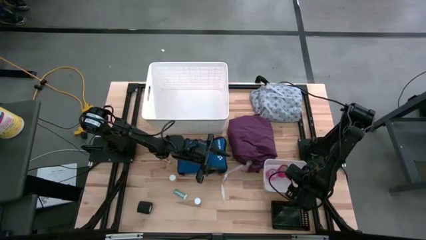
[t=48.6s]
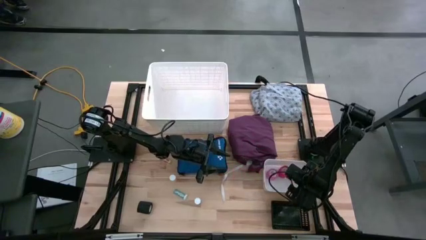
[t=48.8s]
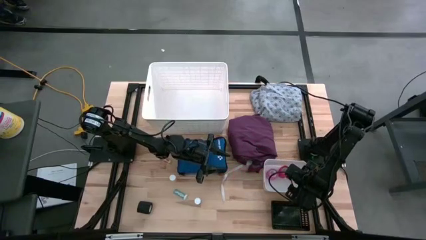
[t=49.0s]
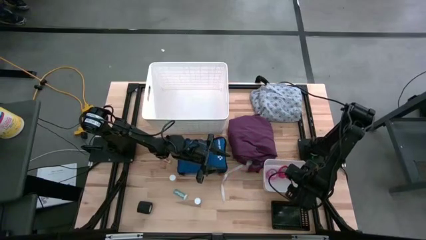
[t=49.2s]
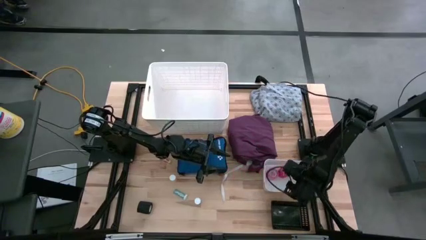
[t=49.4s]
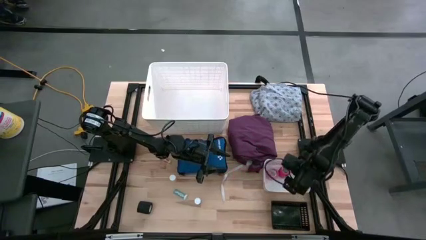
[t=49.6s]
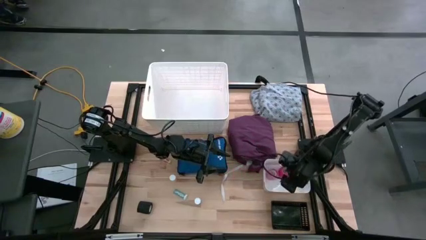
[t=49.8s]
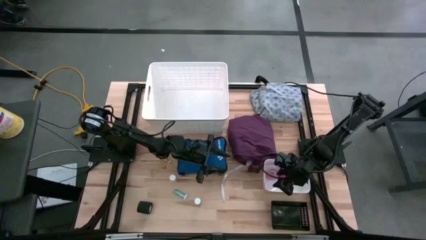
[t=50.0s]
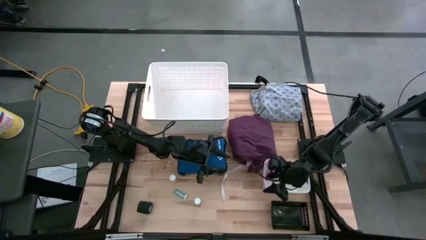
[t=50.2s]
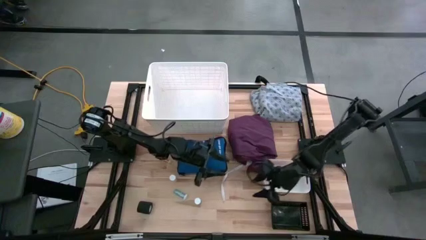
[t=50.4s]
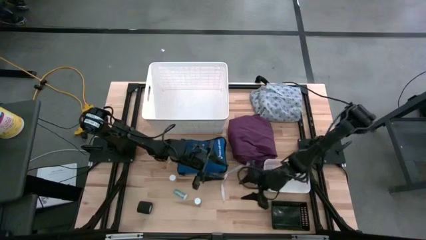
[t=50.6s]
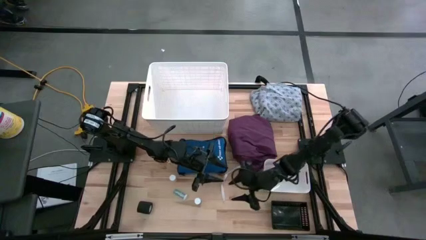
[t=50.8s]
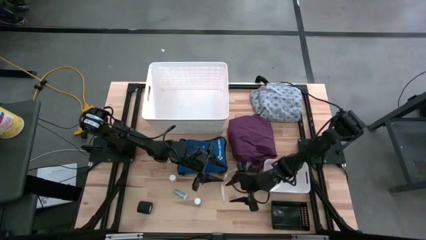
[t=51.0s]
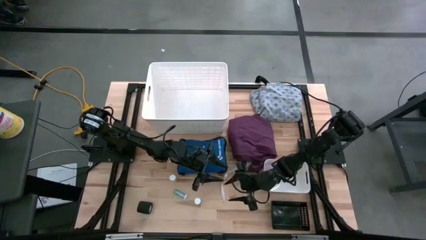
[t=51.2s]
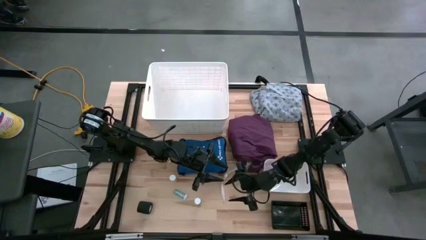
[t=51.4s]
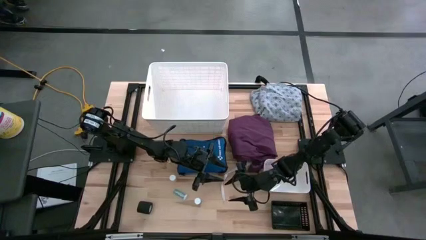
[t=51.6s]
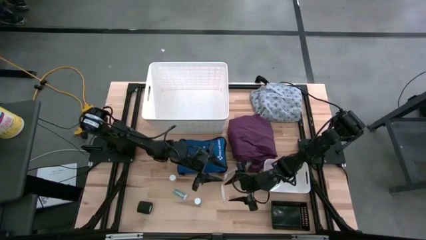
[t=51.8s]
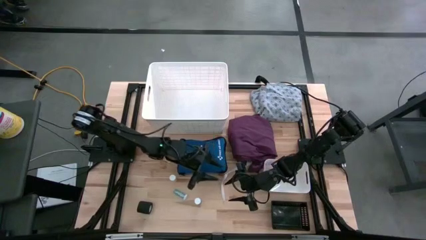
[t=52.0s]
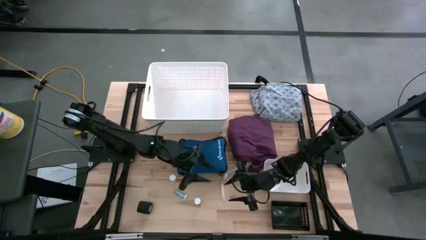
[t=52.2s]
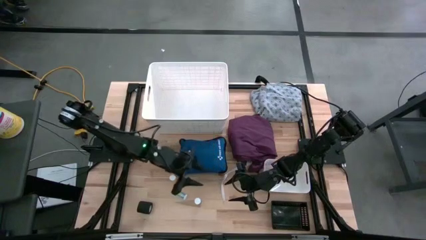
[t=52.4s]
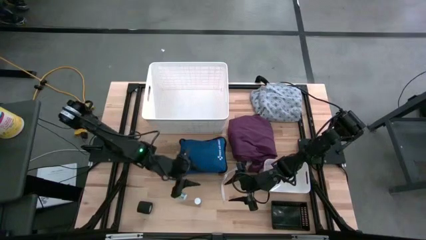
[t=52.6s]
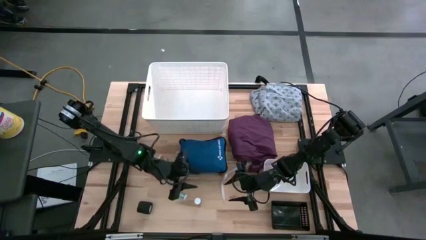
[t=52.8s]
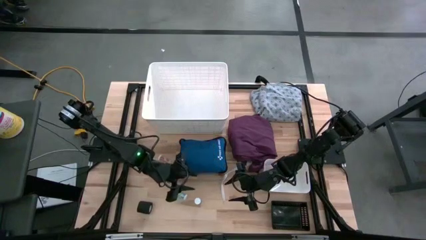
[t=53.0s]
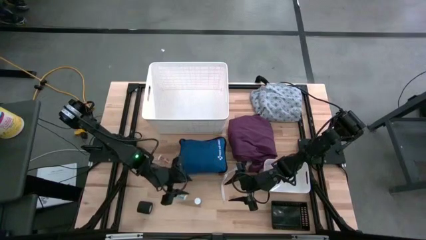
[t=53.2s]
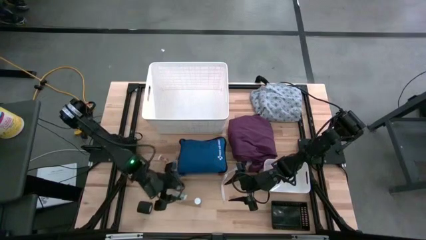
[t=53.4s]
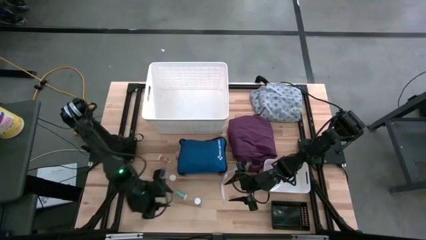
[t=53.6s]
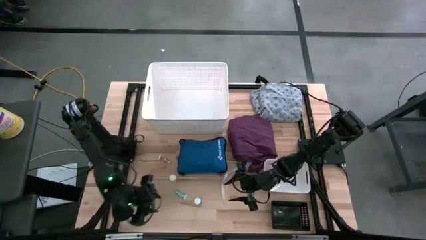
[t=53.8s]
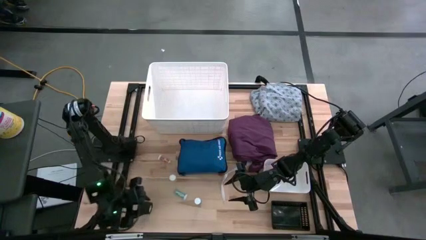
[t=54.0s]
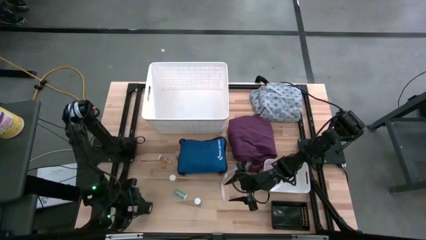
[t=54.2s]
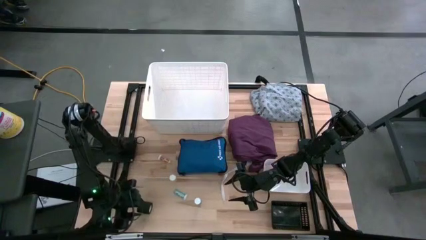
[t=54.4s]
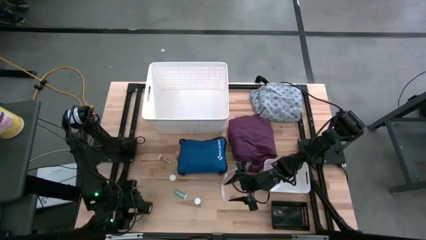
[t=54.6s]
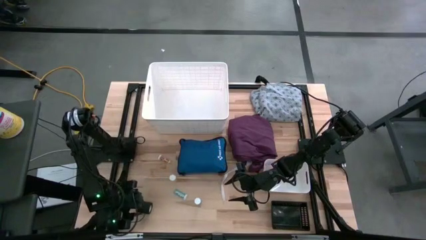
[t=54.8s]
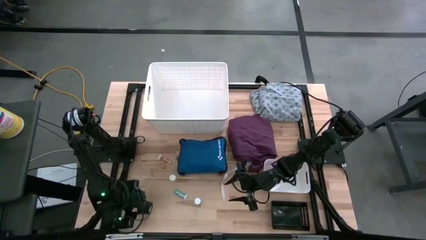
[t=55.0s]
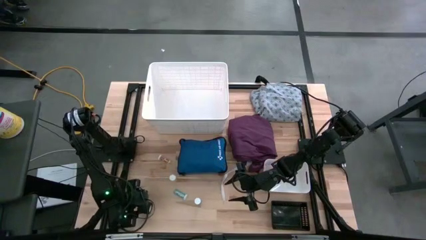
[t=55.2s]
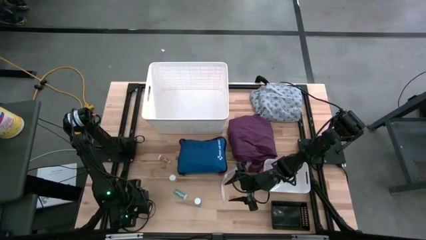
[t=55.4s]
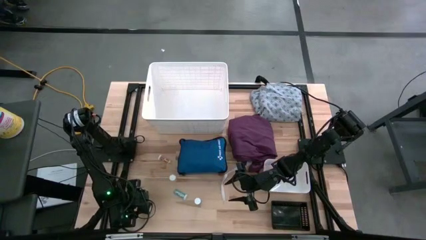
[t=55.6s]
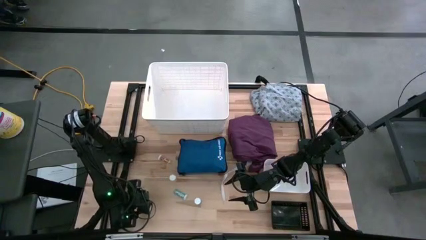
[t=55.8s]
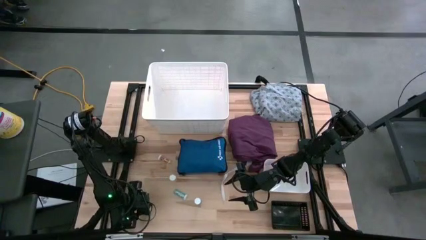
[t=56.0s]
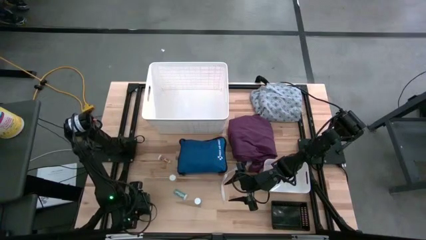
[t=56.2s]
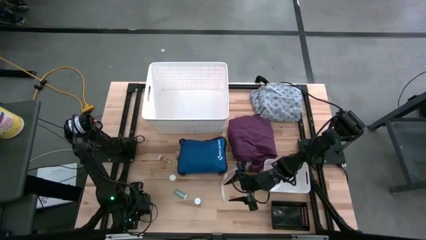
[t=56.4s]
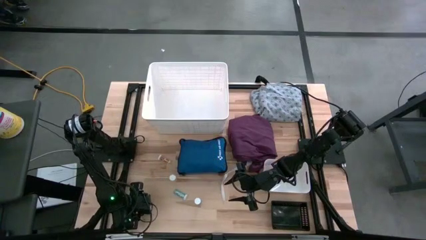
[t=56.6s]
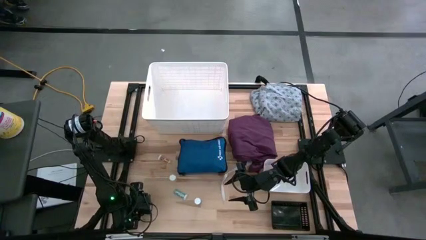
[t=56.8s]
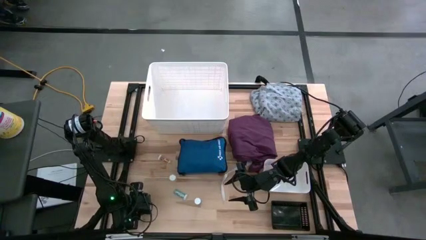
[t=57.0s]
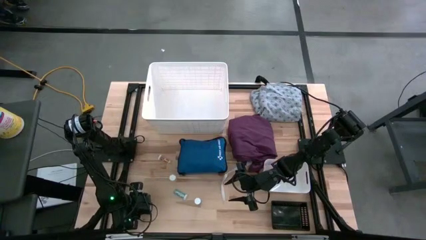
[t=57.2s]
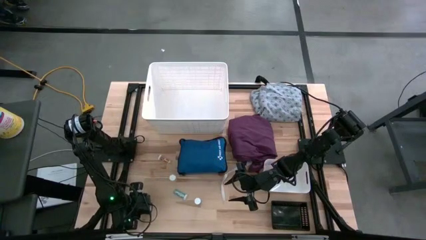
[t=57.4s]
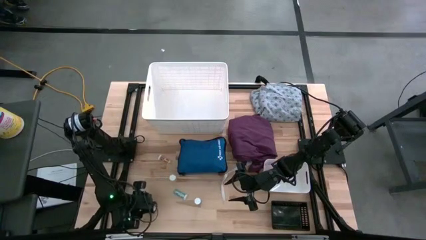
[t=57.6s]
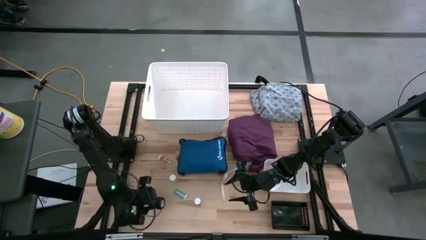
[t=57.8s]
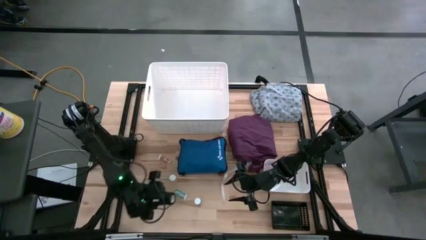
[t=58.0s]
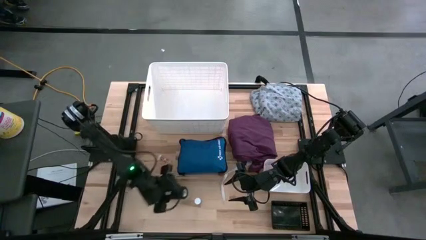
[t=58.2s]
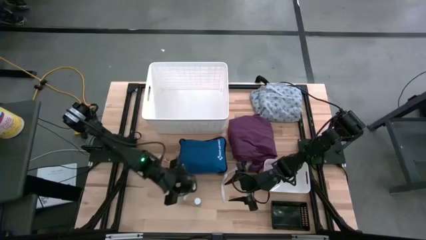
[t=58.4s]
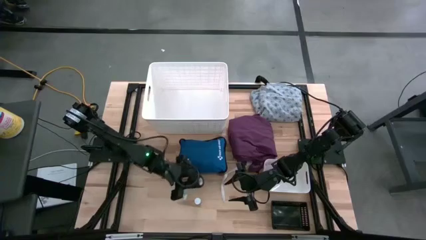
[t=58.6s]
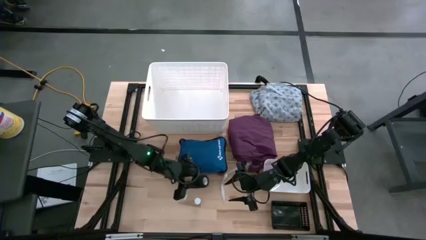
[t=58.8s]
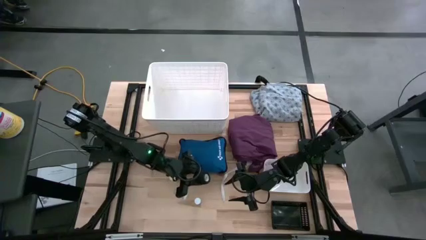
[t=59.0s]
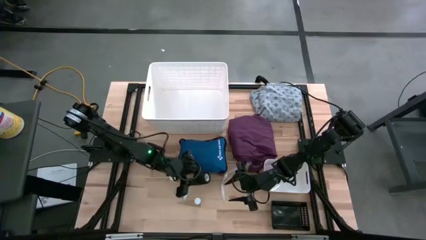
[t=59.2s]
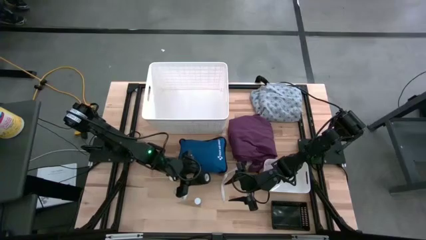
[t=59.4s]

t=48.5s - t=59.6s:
Task: Pick & Place Medicine items
Put the black bandage into the white bin

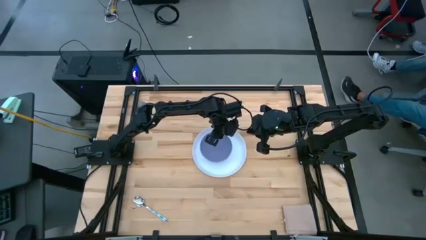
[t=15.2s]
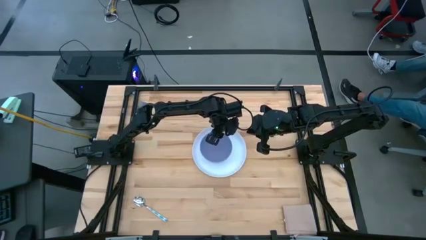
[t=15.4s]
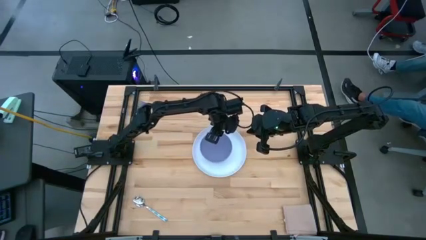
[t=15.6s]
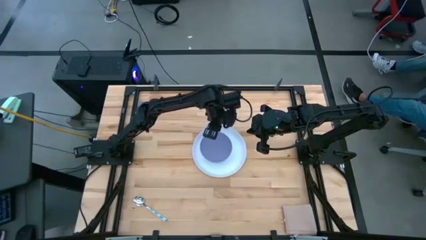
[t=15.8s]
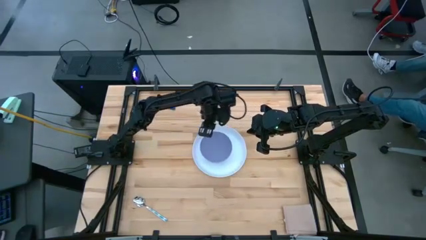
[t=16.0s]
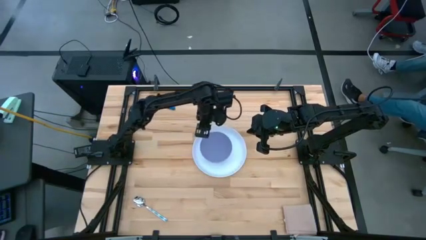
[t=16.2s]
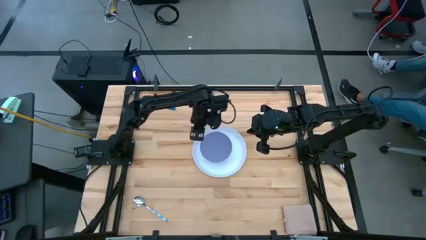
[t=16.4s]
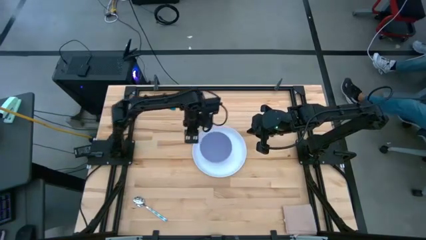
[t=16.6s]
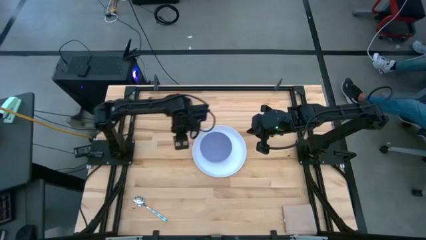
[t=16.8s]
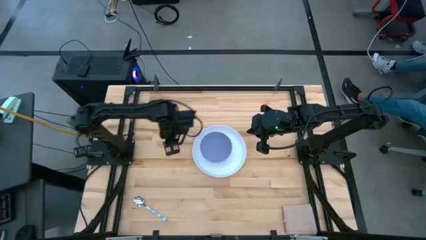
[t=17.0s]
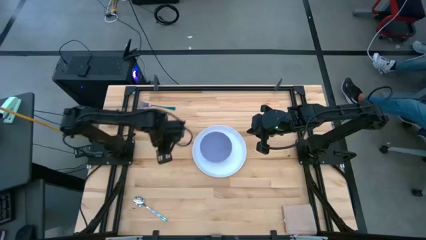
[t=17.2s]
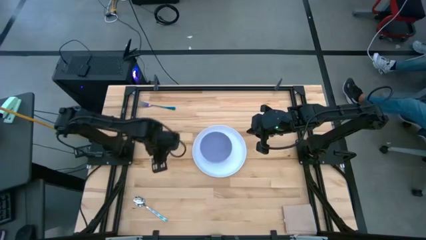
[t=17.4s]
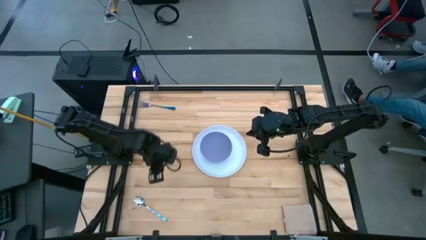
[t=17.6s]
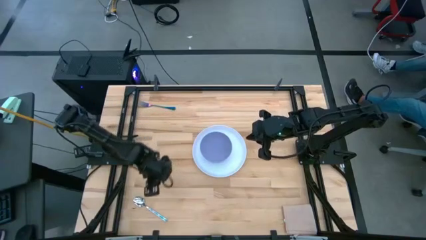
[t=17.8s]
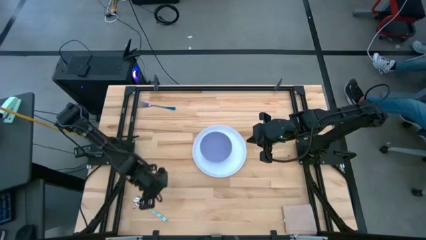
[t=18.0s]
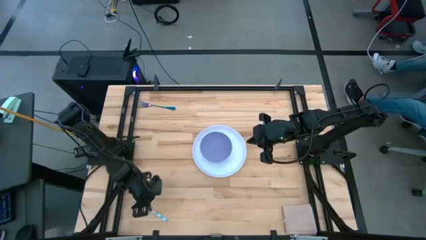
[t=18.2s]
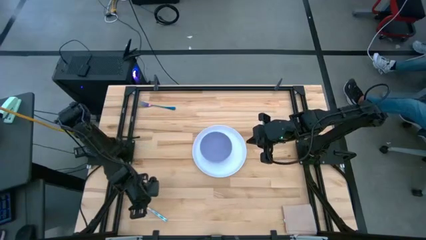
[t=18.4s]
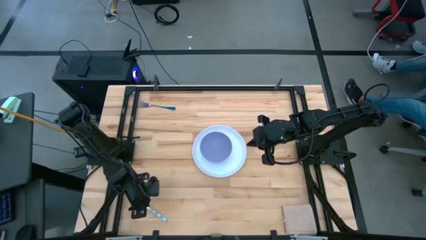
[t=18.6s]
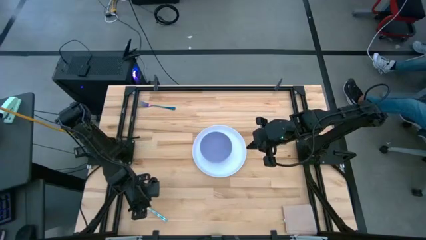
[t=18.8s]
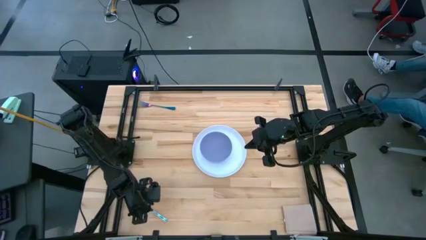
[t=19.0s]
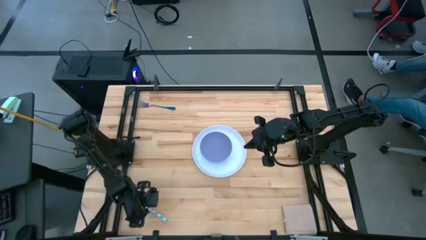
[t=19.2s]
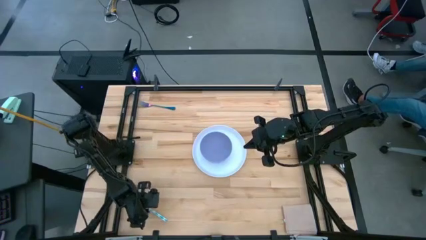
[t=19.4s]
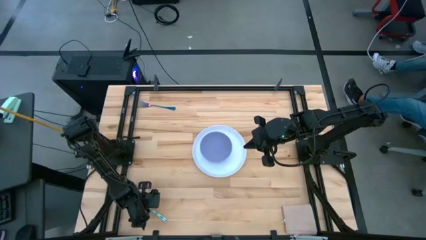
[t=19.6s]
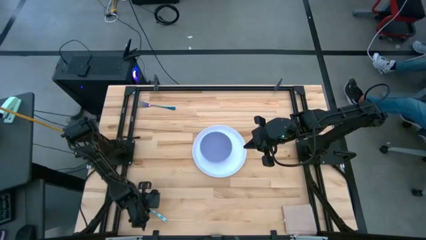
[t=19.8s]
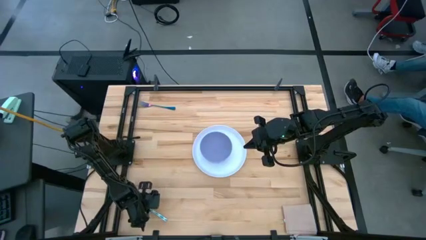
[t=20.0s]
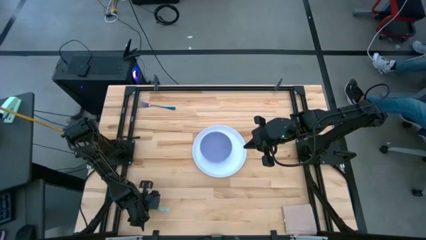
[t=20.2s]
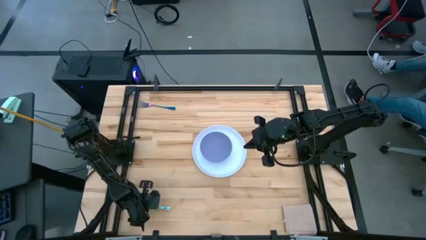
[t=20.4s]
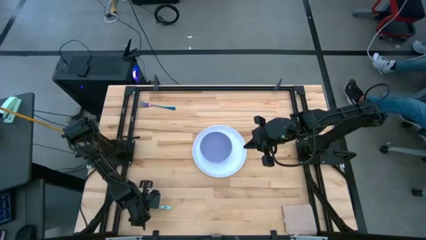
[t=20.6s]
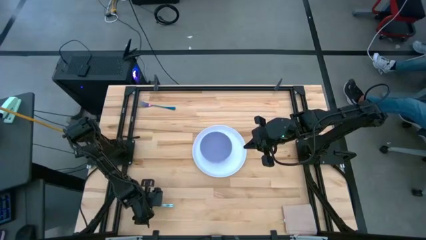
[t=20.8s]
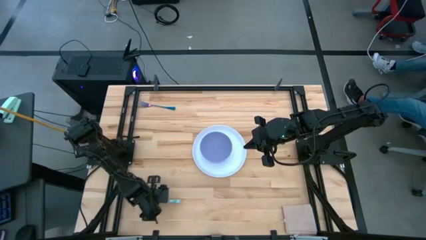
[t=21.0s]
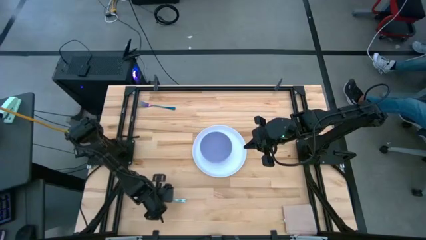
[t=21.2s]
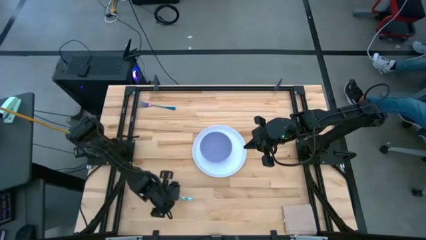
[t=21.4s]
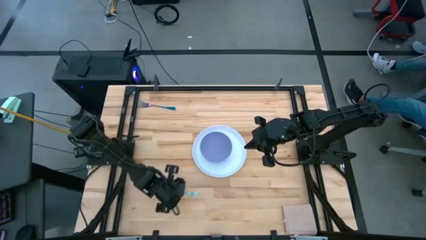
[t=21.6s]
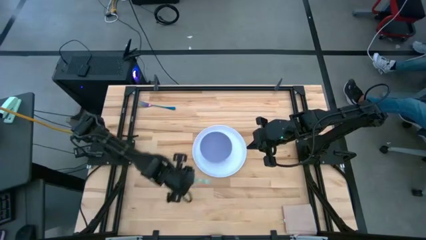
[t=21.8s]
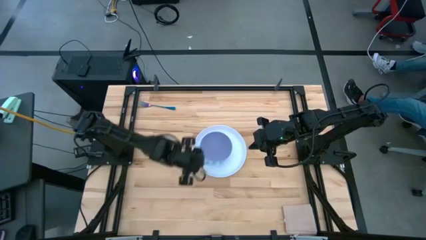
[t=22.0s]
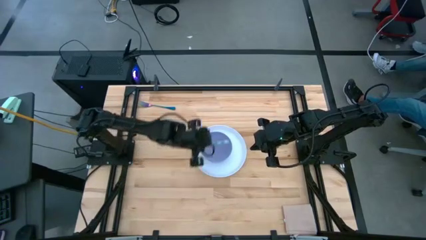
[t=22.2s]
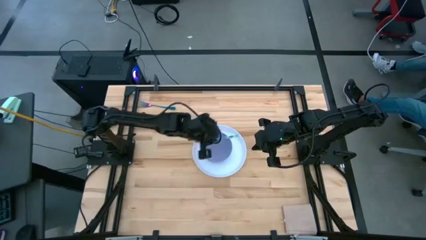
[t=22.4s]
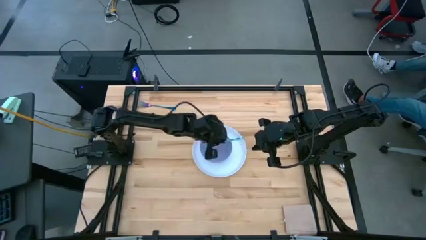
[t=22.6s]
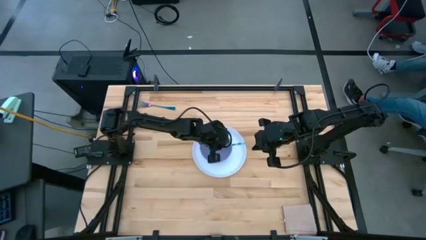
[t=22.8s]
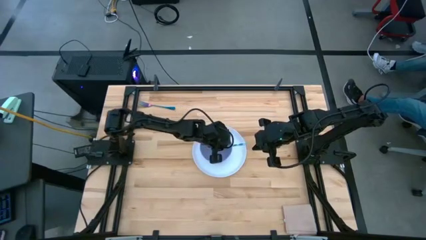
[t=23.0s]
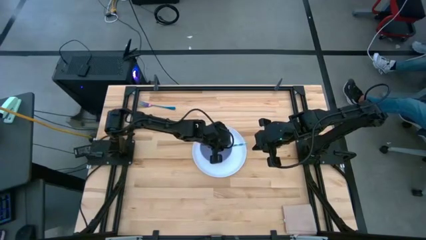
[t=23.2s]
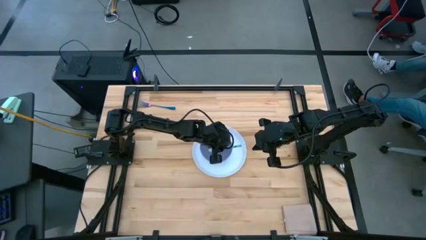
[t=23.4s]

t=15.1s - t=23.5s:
Task: Set table place
Put the spoon into the bowl
